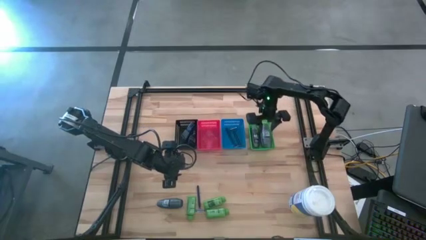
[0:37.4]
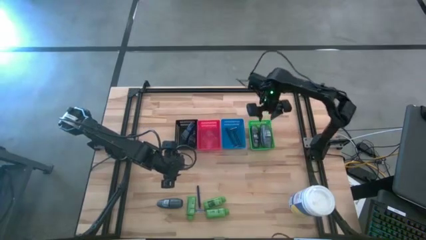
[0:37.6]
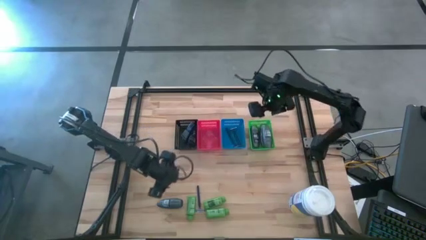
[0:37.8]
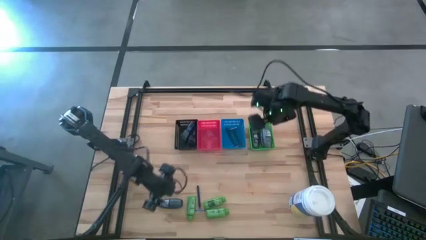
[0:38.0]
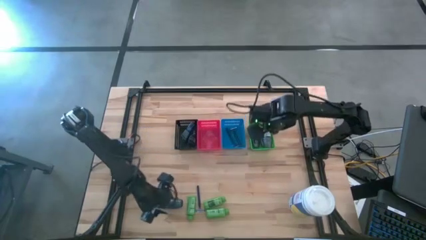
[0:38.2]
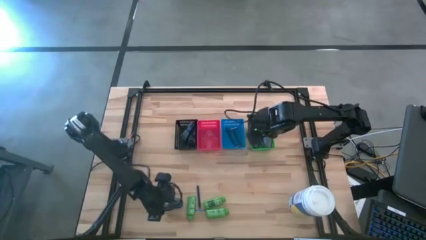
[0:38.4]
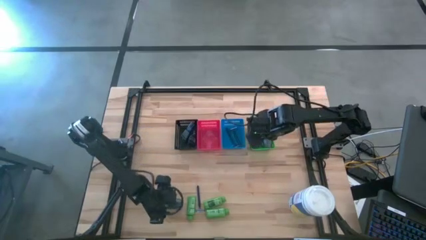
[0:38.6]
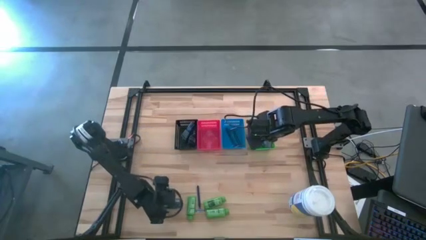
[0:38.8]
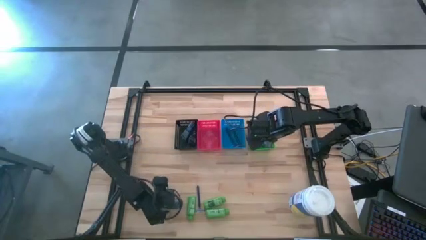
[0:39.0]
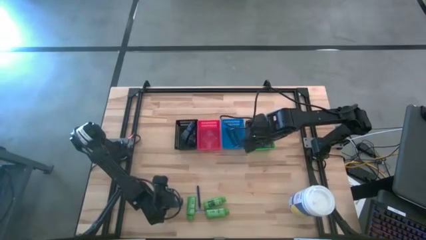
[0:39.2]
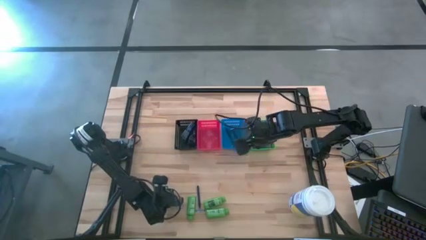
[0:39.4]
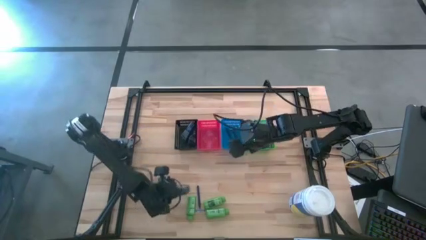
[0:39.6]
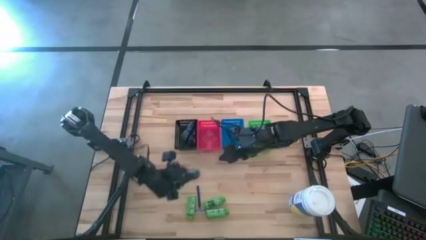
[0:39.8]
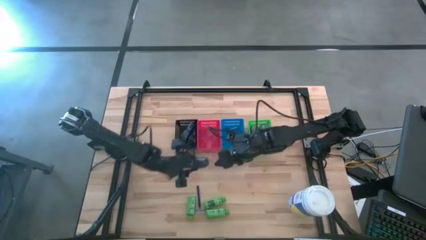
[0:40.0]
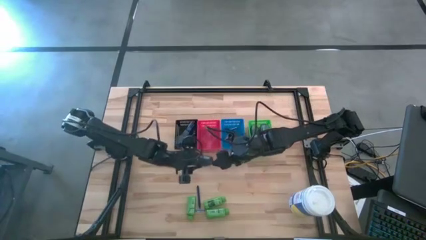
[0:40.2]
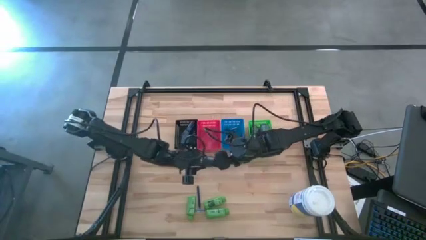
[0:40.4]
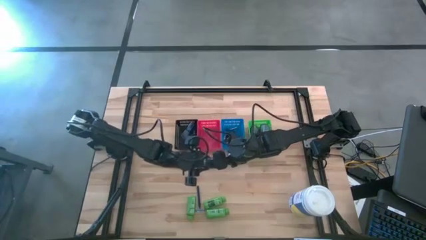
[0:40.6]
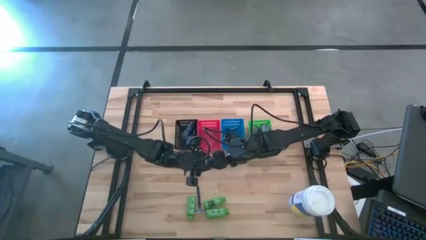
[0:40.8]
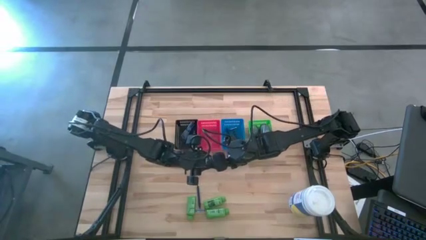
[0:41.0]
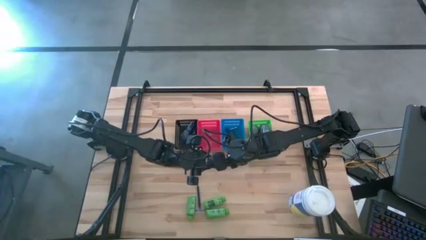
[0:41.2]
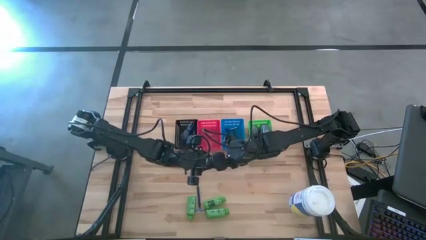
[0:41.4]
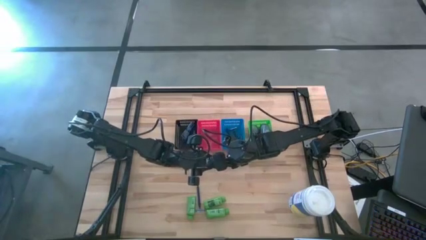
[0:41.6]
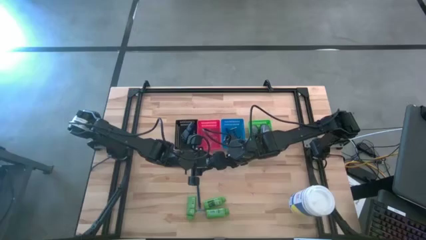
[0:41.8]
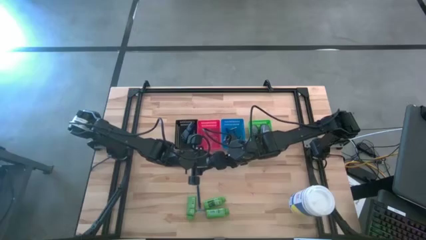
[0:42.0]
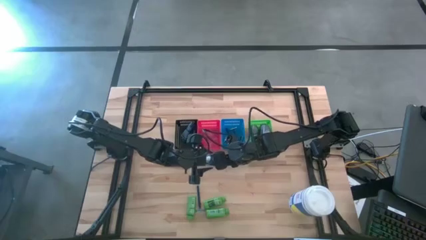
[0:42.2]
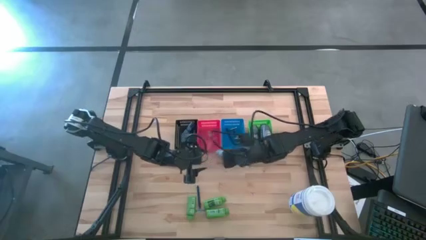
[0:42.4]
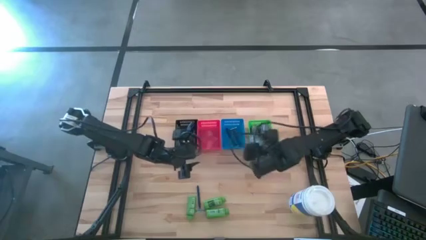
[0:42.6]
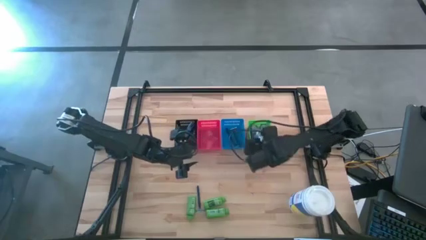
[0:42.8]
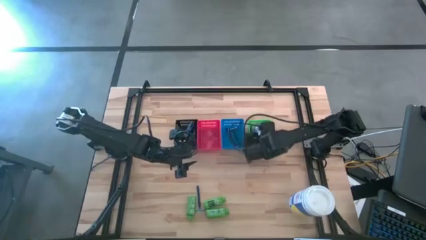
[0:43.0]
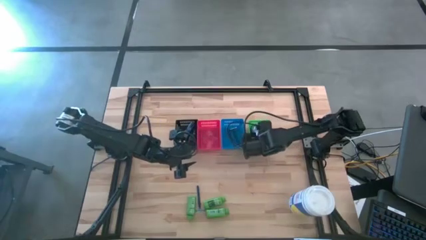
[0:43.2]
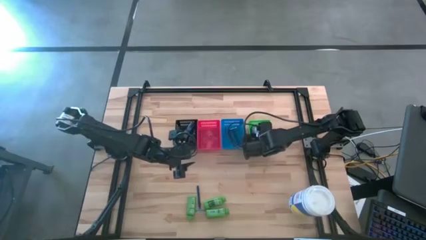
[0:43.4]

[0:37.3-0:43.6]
Task: Pick & Place Travel size toiletries
Put the black deodorant into the green basket

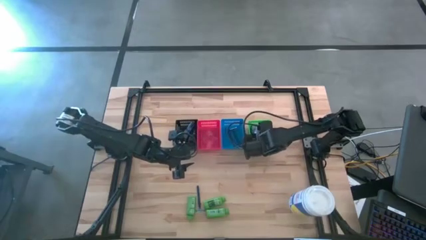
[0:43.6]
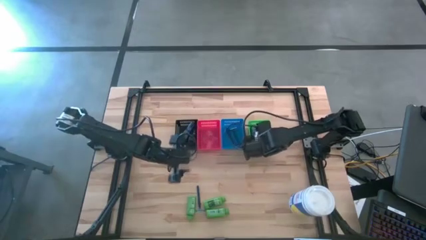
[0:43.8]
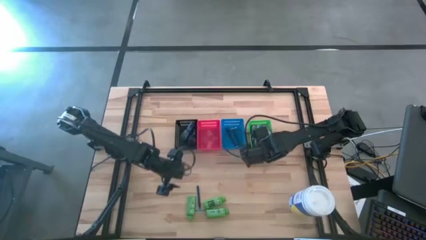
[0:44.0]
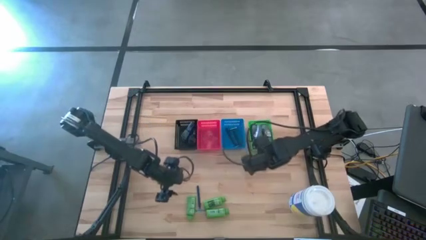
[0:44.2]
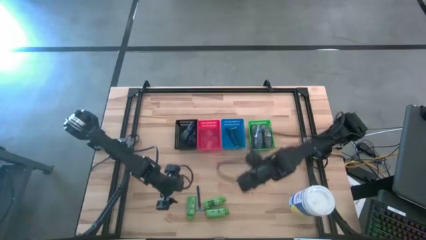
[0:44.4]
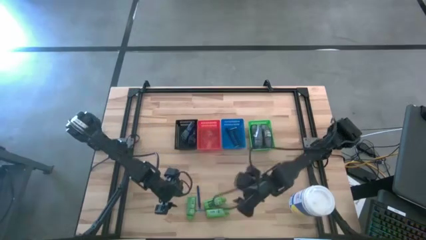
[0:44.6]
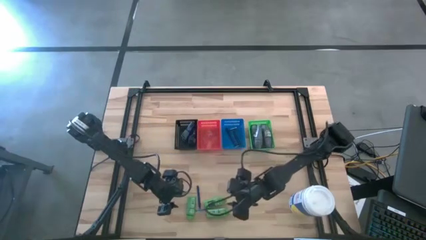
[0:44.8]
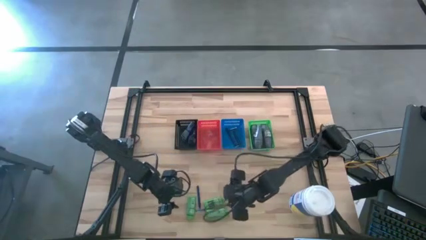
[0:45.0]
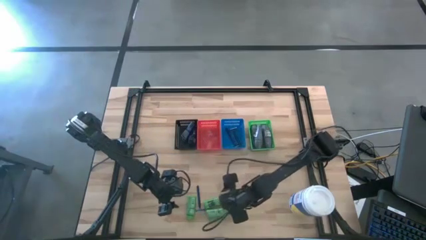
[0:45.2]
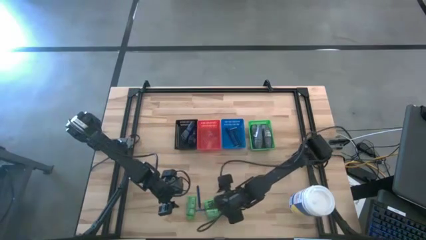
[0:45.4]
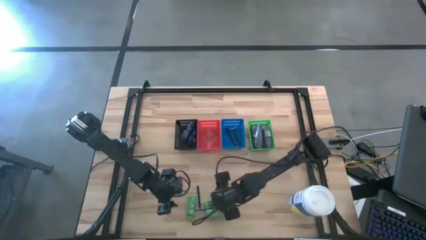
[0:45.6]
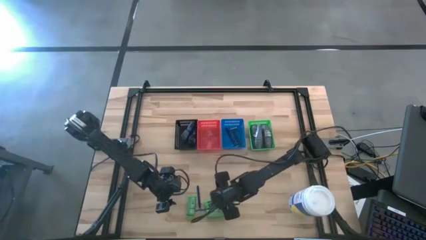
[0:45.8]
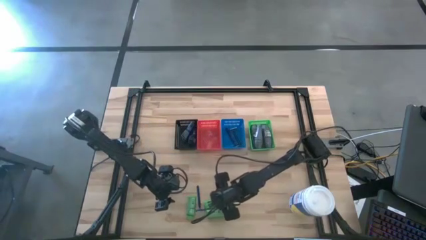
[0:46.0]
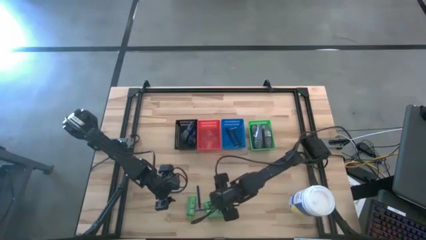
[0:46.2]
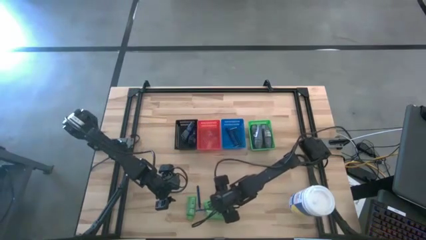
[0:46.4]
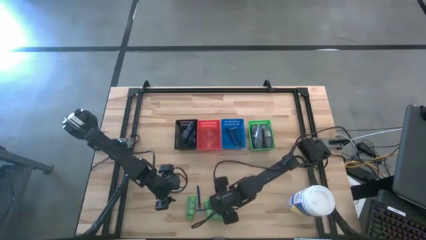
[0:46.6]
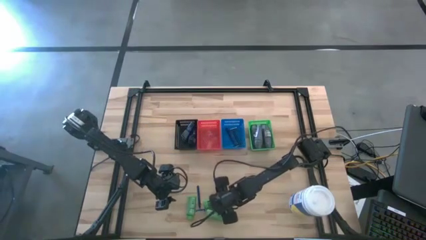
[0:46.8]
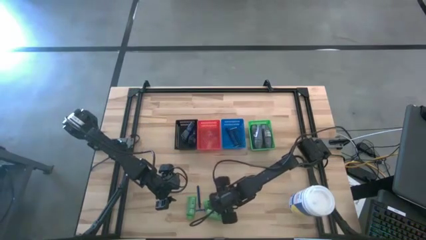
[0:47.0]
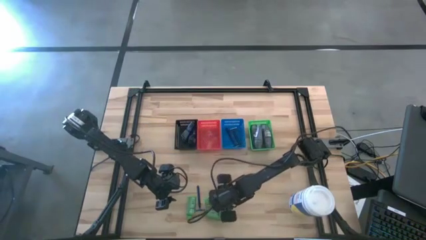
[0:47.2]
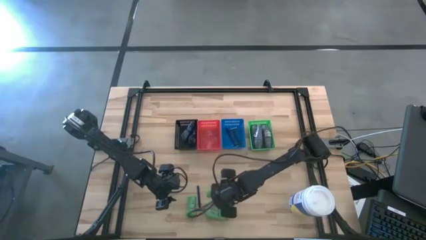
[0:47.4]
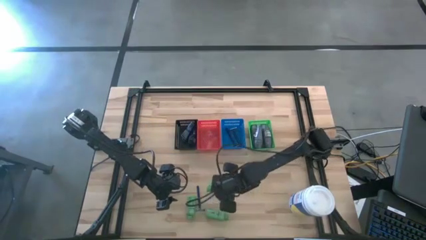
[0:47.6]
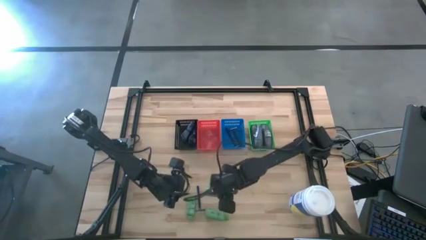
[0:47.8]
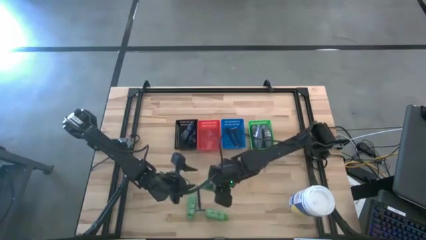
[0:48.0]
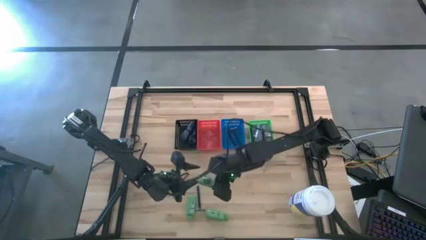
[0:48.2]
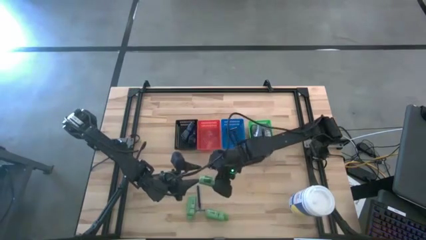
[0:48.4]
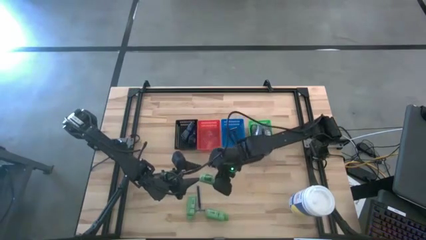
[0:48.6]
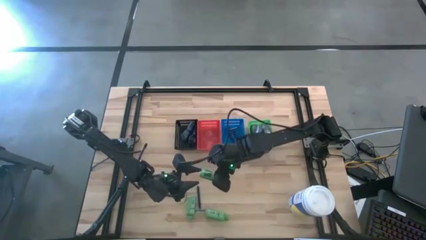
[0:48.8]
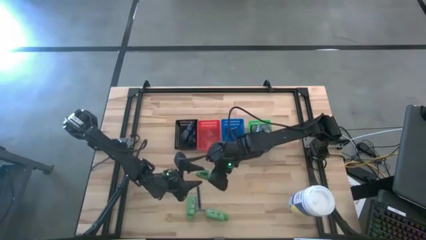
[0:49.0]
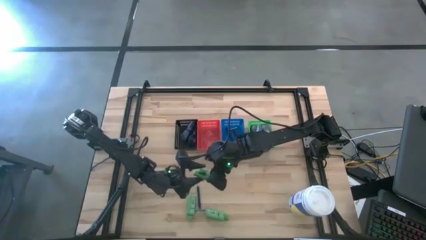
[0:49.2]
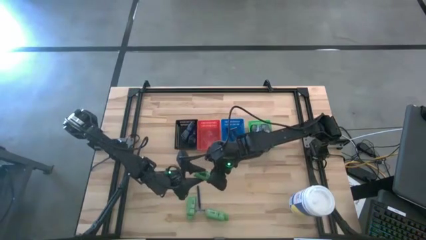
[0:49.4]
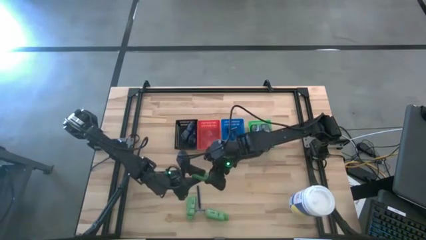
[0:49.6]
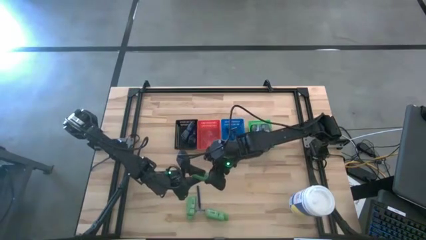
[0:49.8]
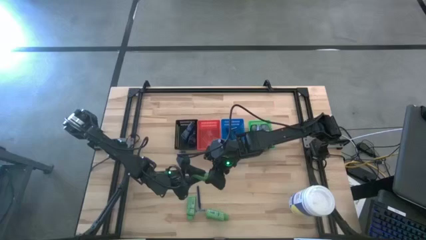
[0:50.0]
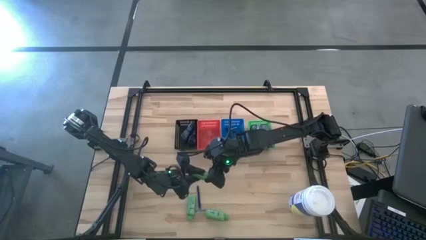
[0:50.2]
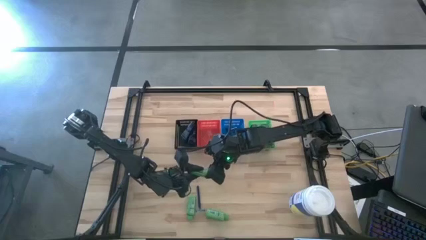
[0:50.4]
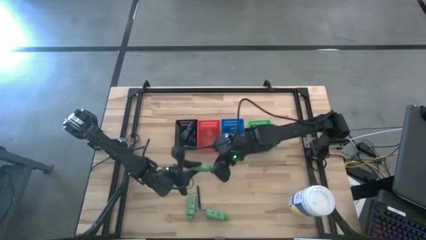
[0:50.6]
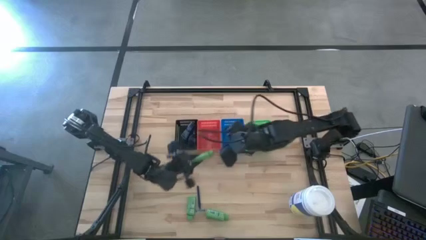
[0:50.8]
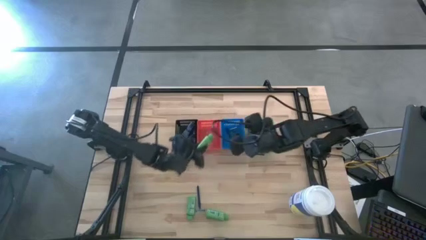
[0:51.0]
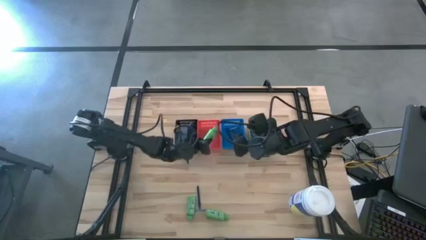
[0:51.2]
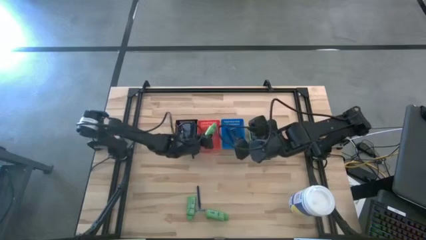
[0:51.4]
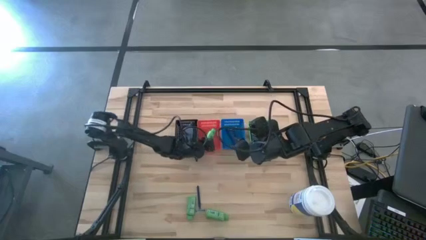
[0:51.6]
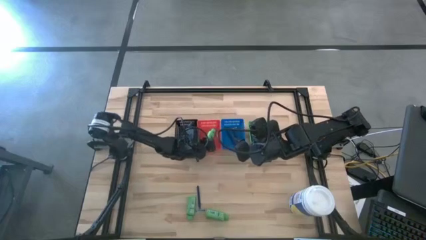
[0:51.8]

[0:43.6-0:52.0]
Put the green shampoo into the red basket

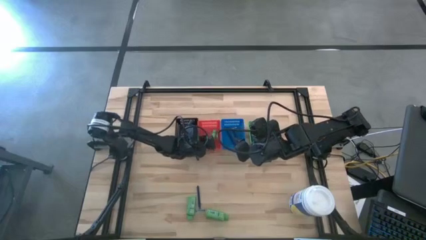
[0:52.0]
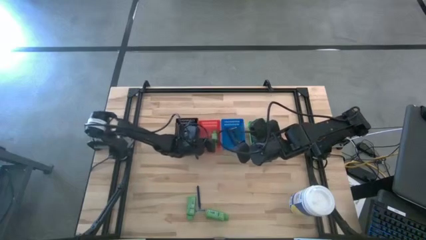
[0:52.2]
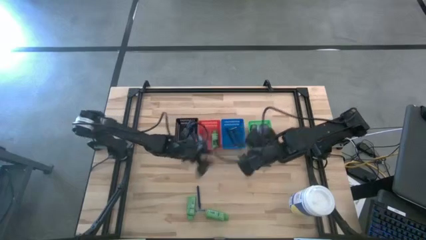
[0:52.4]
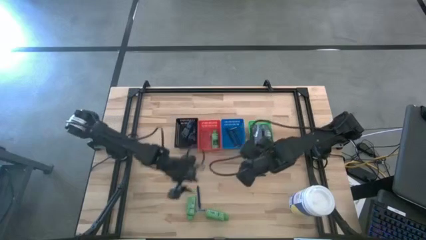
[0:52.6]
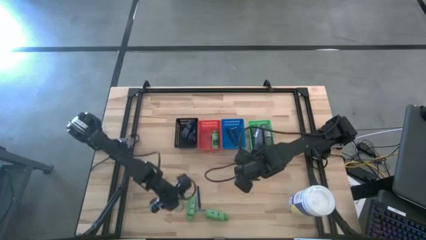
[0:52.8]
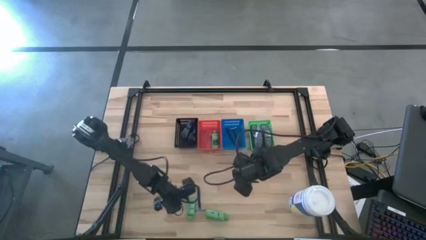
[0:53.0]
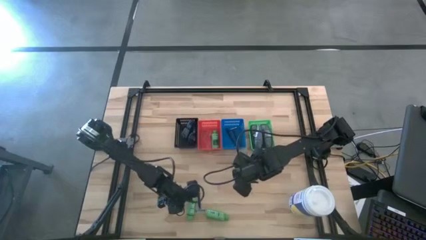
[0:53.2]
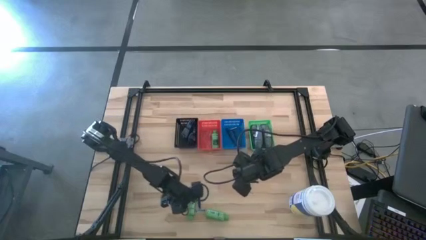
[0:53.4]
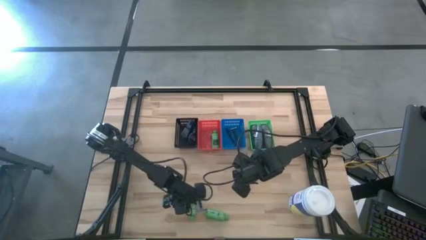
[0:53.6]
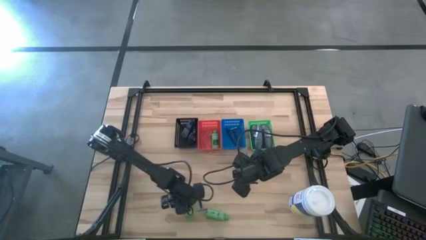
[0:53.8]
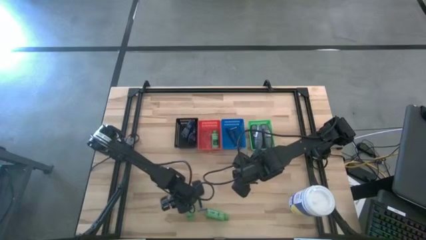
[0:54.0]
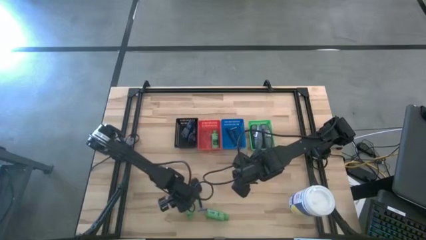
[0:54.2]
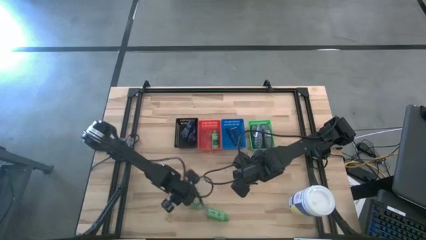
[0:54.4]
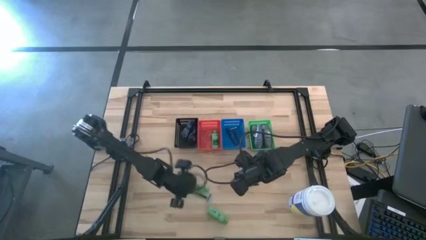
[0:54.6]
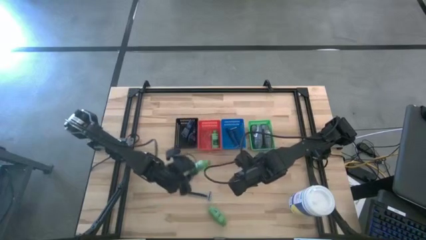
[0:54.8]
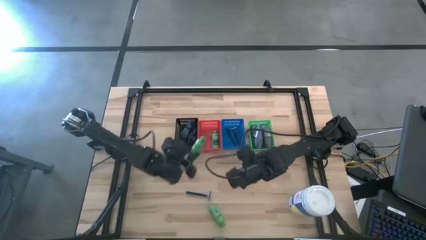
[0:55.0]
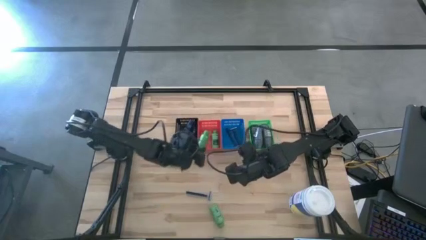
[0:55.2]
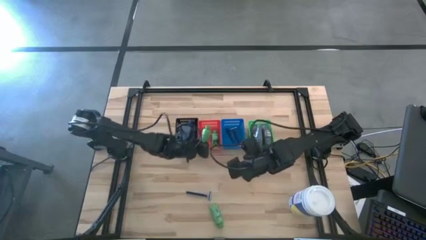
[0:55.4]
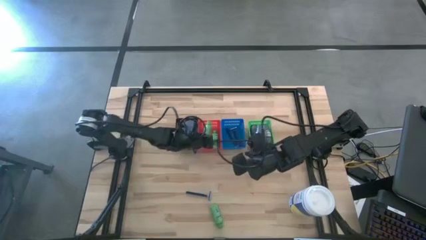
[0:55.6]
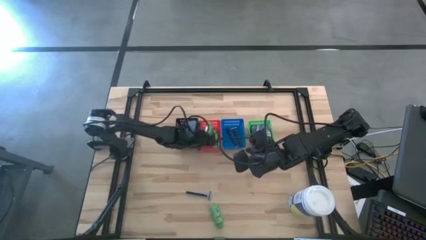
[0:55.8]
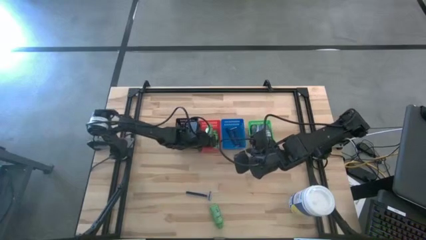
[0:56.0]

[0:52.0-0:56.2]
Put the green shampoo into the red basket
